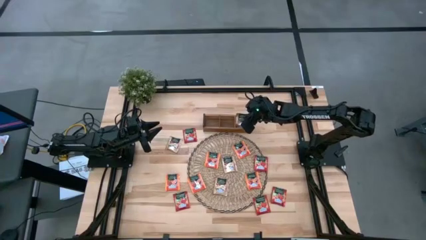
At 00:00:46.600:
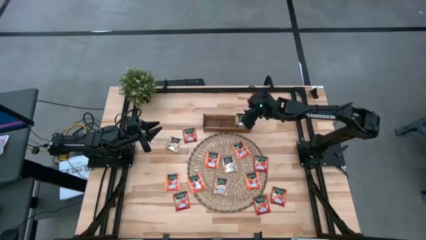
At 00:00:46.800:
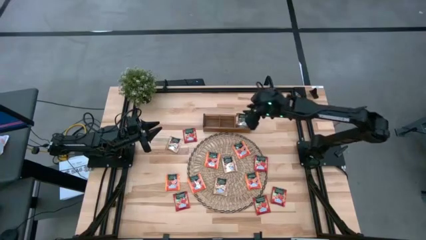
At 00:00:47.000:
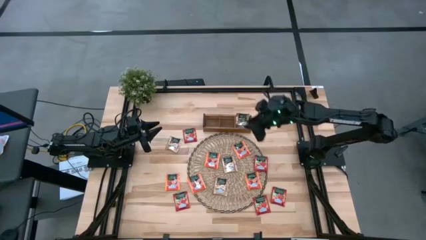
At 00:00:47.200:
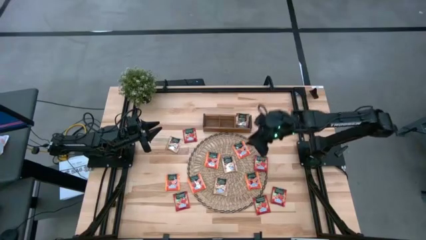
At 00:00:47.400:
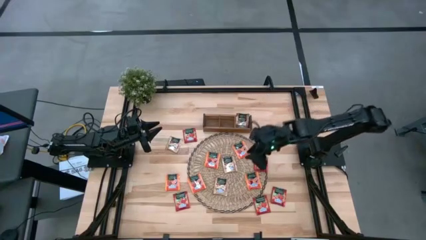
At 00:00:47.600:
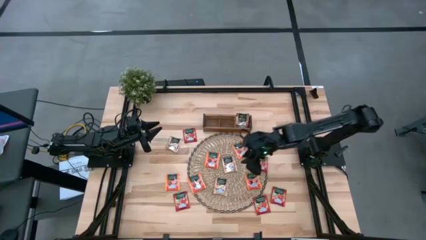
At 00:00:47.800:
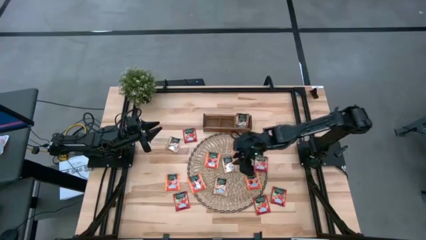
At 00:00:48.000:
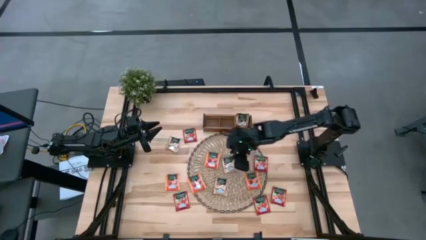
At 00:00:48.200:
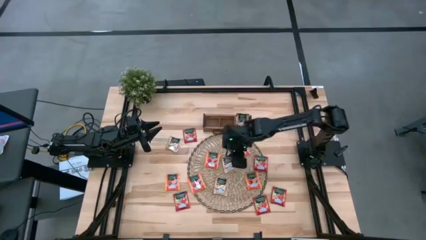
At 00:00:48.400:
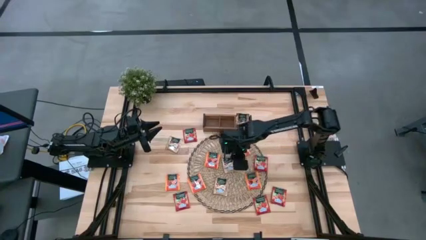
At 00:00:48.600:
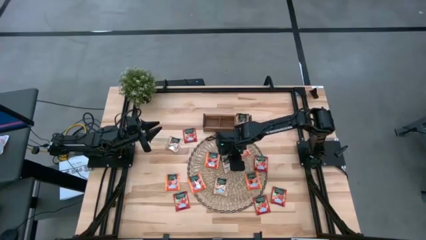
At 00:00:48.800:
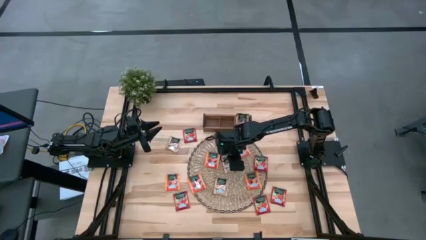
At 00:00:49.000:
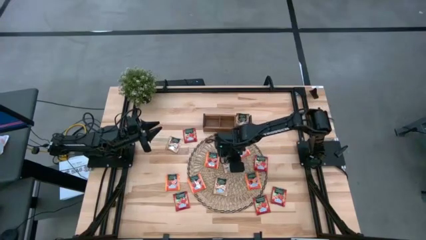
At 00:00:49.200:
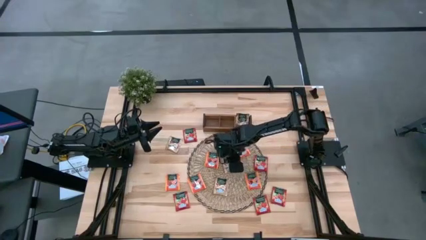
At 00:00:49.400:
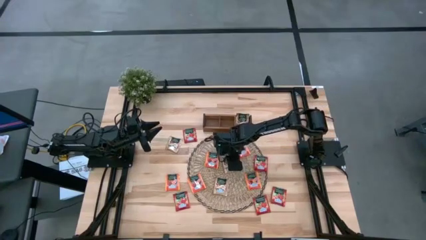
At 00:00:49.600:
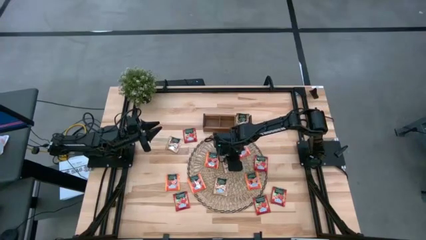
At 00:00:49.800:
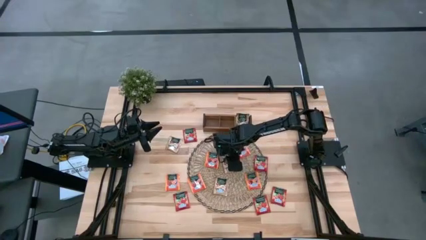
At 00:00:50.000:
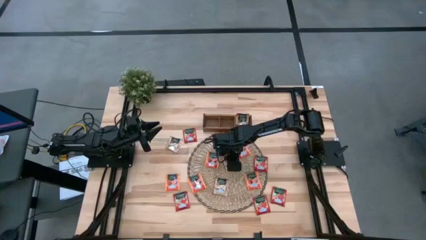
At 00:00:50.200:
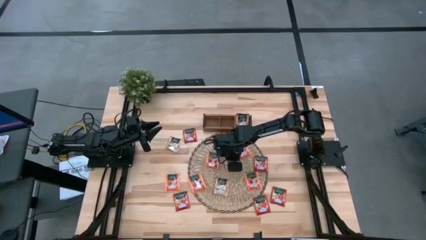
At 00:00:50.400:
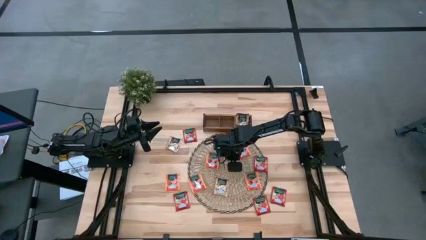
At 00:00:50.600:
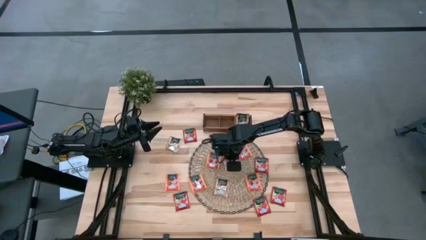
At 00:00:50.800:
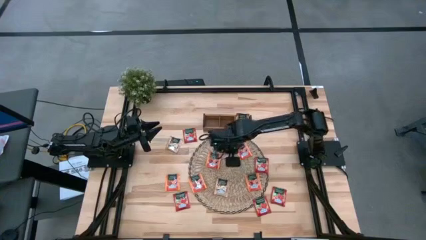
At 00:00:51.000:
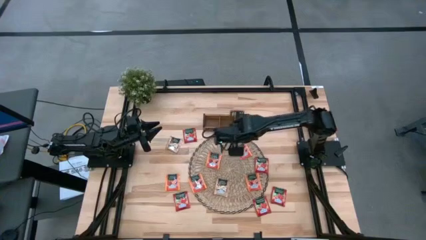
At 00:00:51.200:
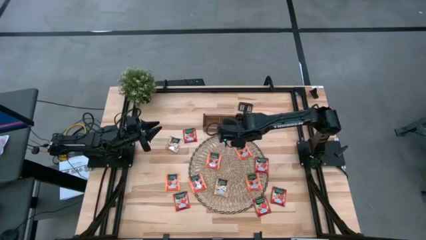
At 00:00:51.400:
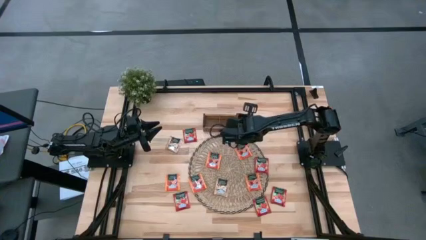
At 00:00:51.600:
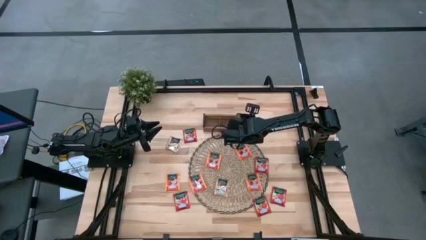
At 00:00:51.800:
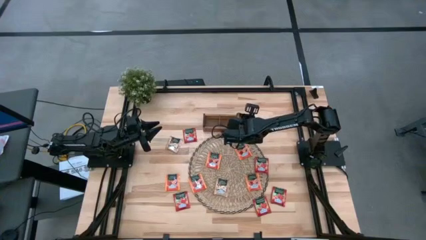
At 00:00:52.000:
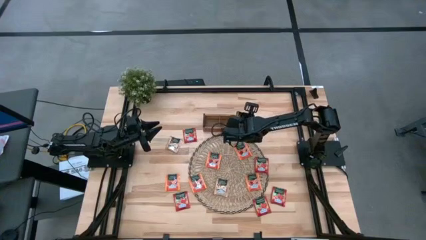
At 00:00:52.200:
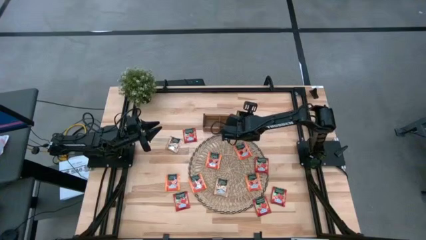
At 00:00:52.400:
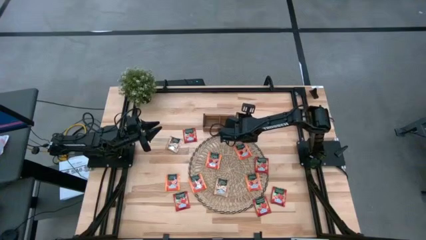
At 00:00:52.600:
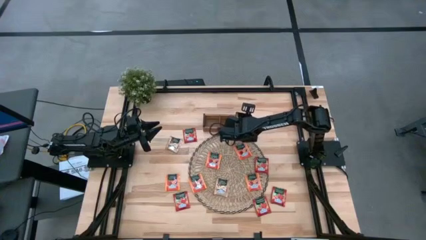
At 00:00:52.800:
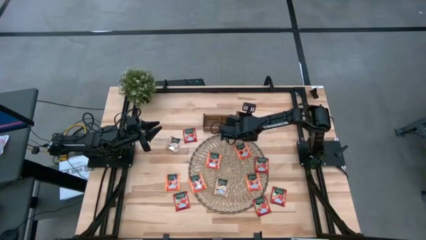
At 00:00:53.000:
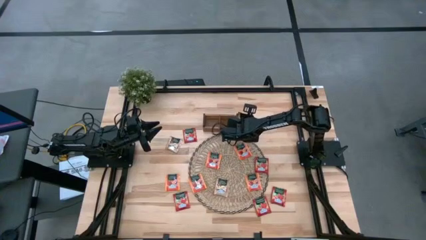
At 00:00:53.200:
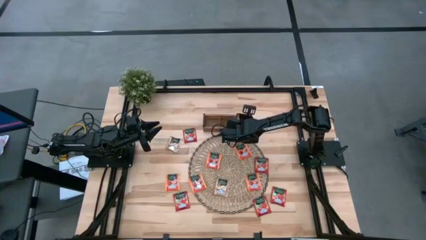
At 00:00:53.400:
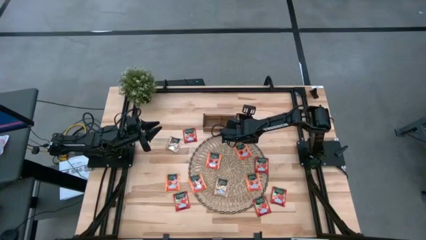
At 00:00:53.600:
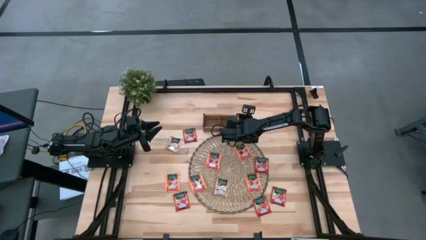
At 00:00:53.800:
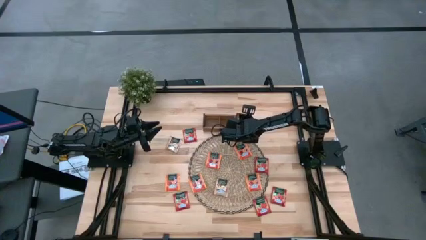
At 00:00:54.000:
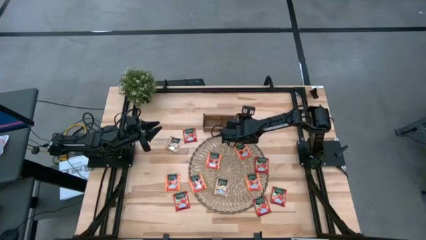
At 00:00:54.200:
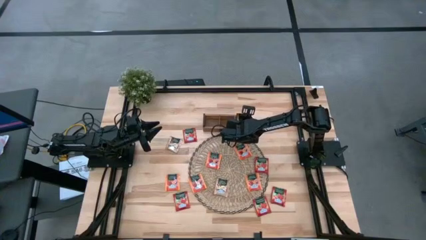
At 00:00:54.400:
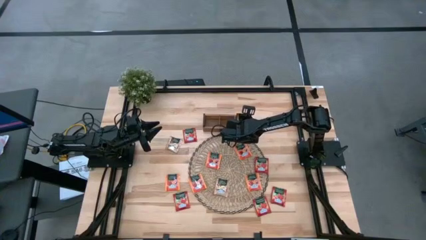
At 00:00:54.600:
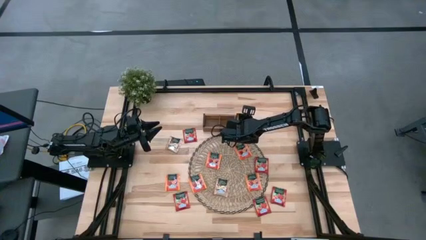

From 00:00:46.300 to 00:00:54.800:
Task: Pick & Place Tea
Put the top middle brown tea bag into the right section of the wooden organizer

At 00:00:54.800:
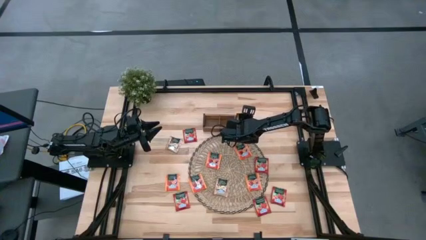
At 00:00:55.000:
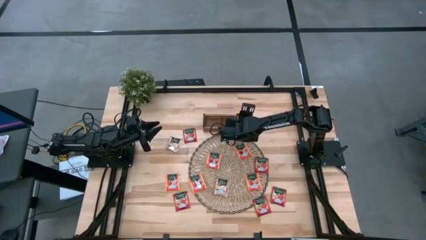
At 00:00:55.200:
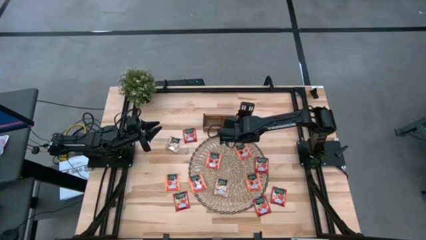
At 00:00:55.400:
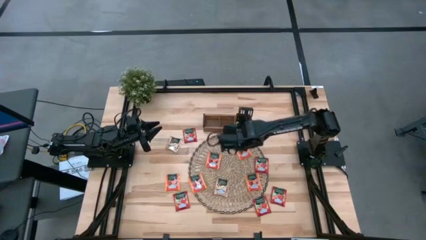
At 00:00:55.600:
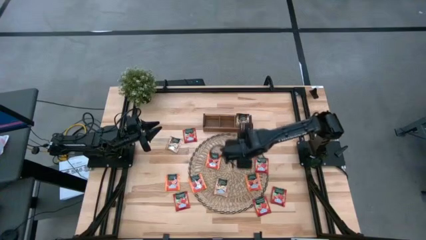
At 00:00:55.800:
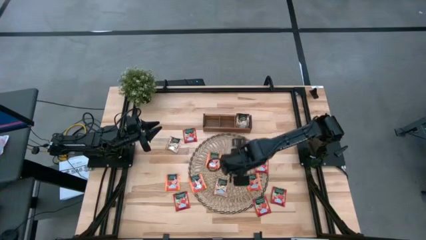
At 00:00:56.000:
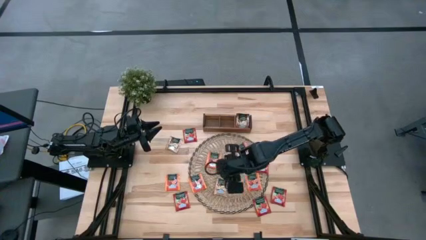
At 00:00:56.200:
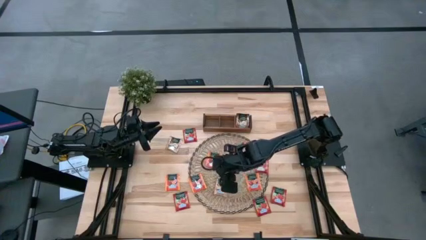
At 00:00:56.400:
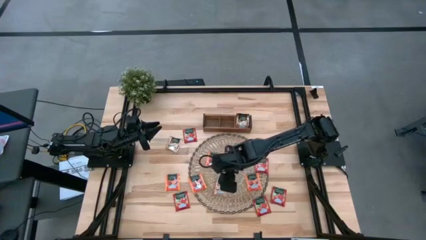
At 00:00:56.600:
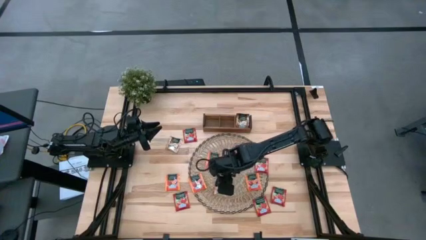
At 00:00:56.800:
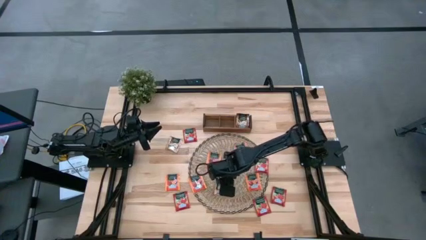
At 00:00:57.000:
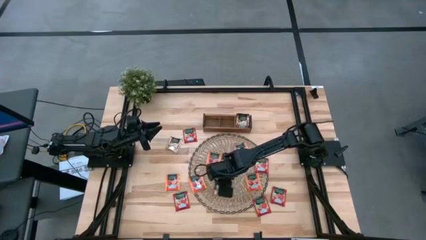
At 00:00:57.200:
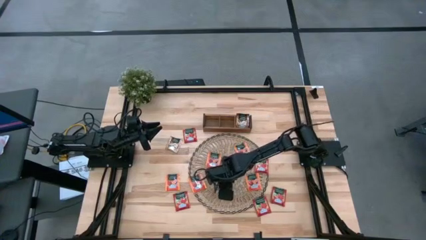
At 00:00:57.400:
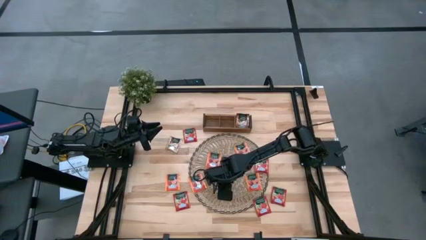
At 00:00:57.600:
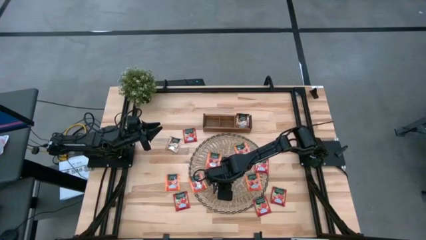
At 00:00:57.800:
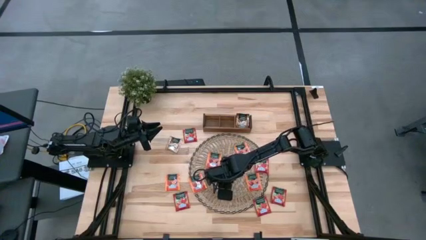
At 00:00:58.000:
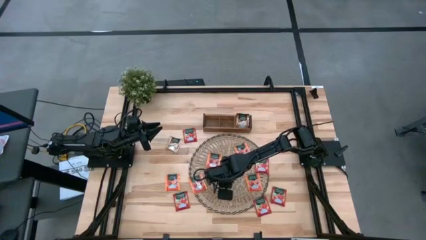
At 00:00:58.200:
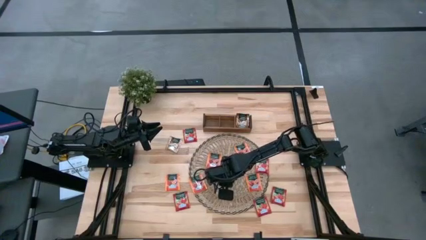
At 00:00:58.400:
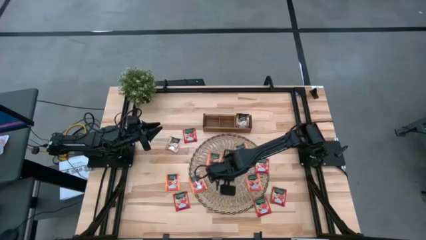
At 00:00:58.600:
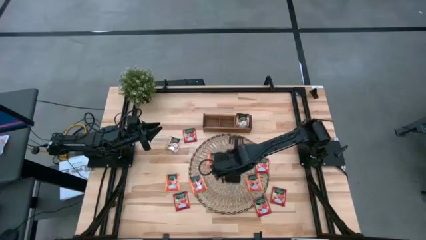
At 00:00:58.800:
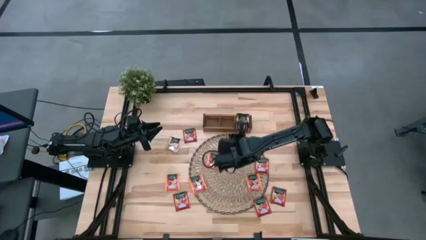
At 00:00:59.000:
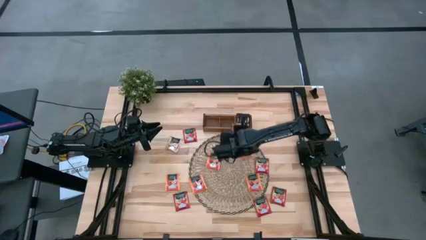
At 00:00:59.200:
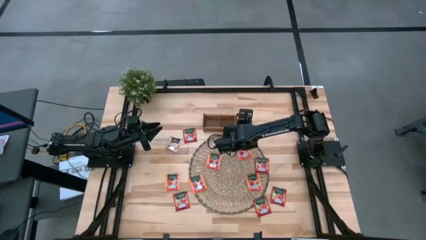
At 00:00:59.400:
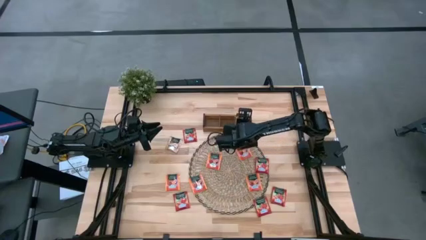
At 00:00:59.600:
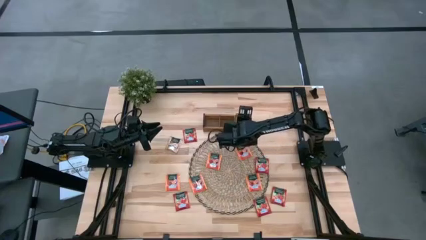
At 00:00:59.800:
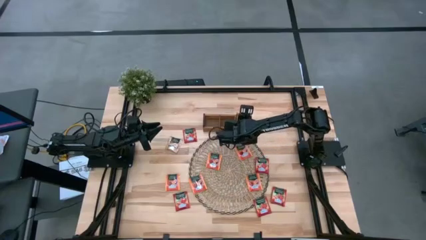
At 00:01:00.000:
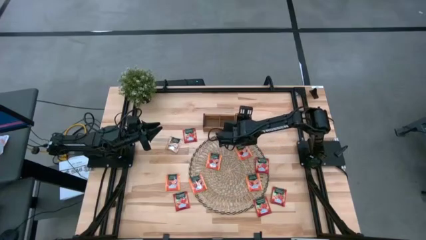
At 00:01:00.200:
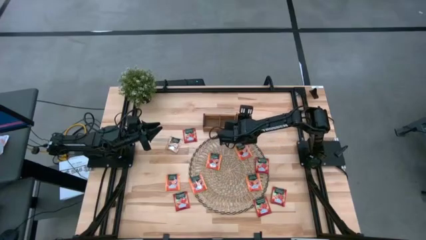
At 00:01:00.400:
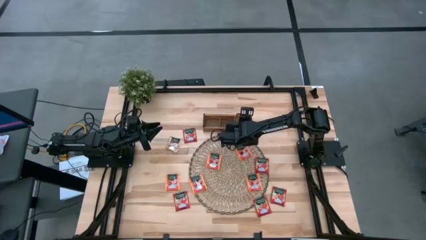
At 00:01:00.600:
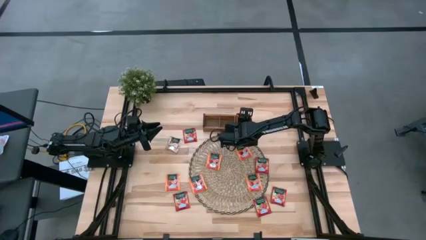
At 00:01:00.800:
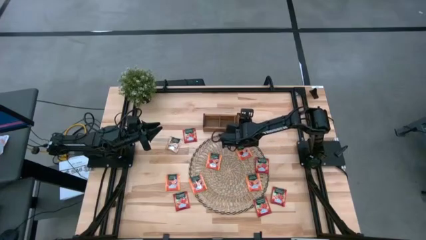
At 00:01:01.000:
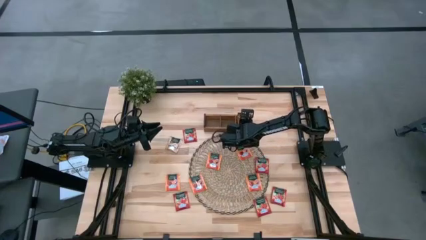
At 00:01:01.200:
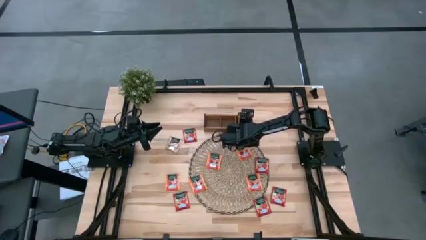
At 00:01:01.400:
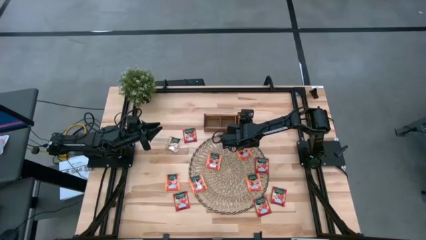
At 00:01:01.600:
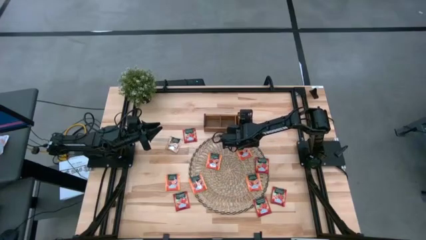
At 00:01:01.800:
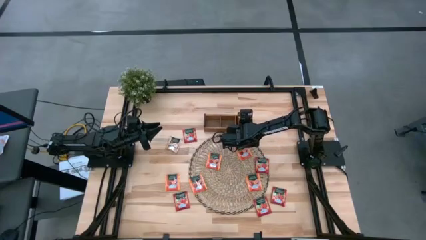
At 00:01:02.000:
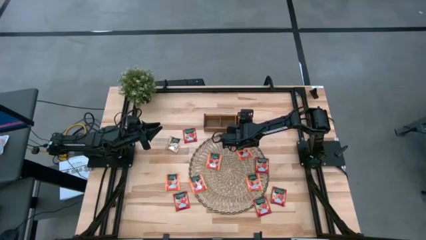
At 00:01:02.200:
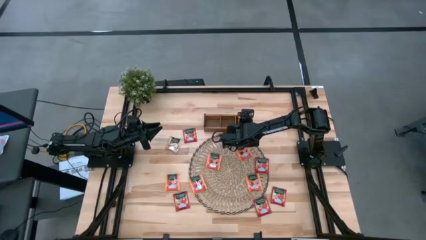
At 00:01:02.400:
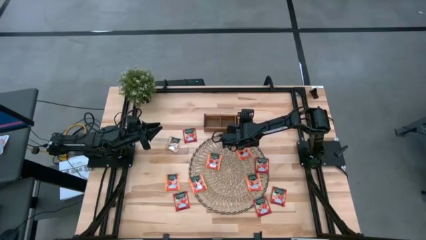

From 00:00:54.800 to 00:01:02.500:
Put the right brown tea bag into the right section of the wooden organizer
